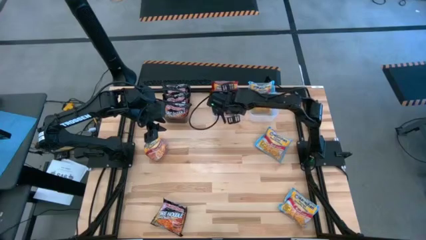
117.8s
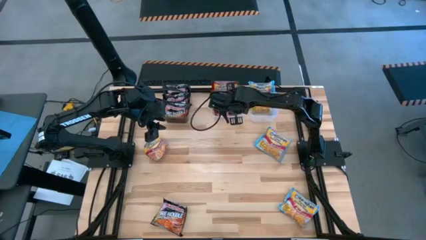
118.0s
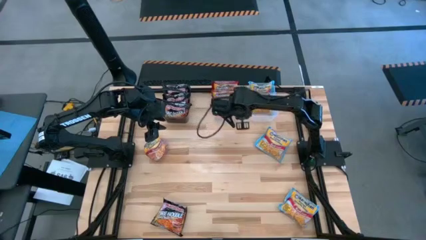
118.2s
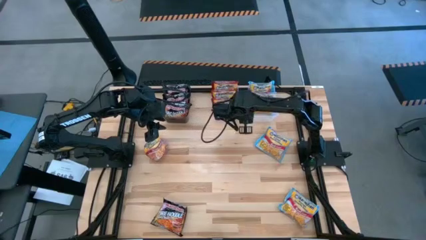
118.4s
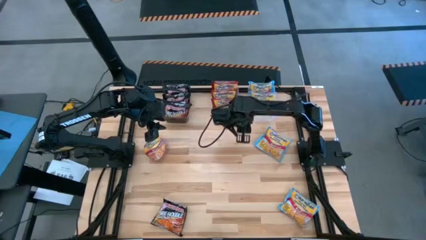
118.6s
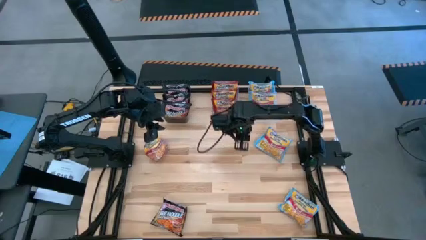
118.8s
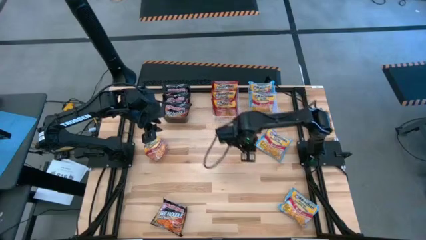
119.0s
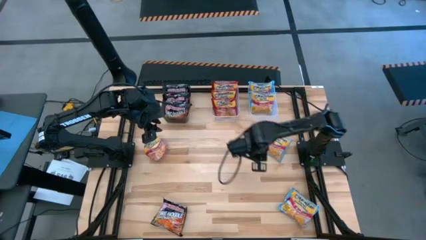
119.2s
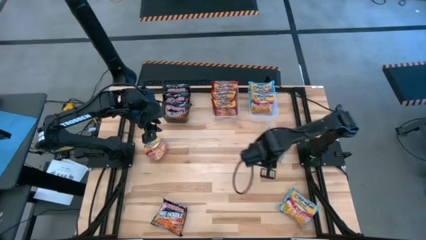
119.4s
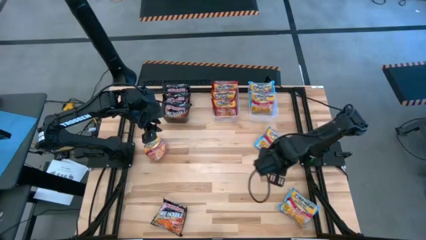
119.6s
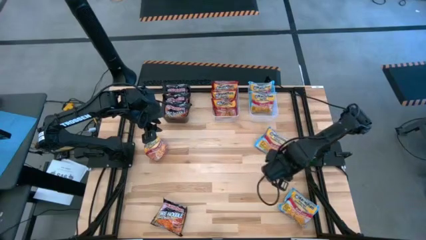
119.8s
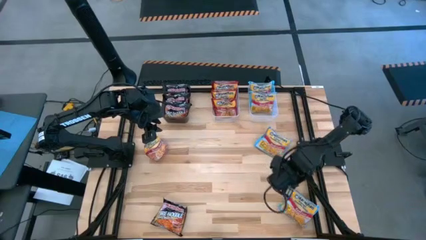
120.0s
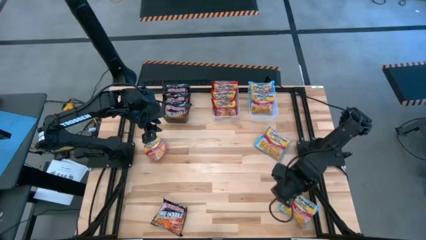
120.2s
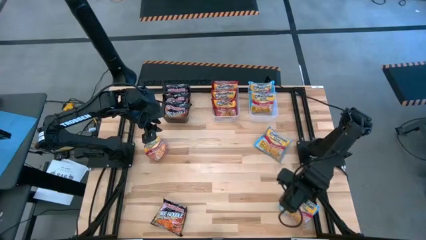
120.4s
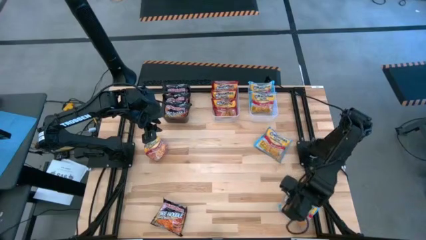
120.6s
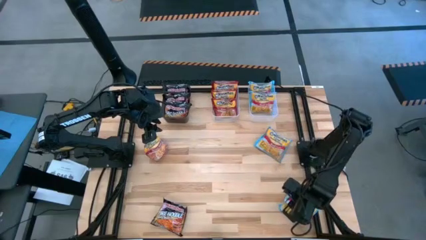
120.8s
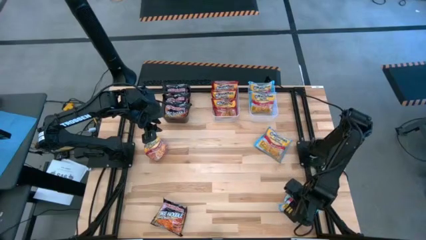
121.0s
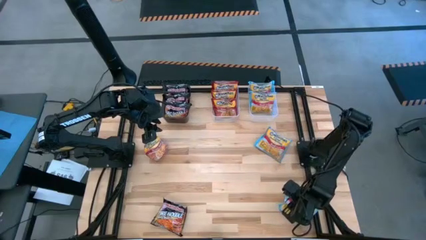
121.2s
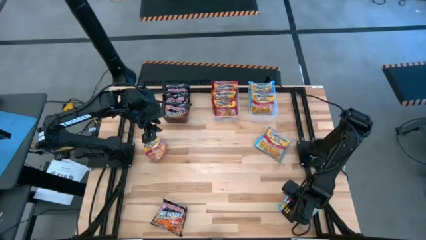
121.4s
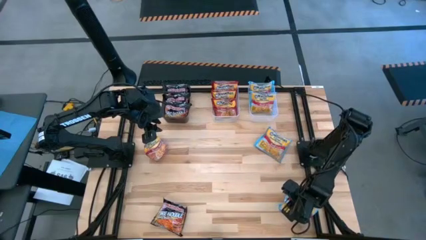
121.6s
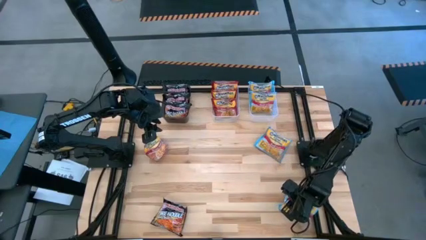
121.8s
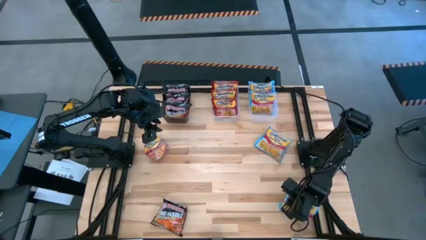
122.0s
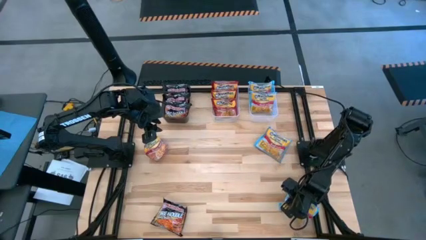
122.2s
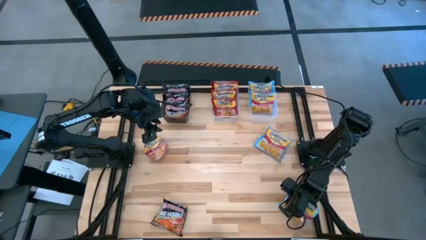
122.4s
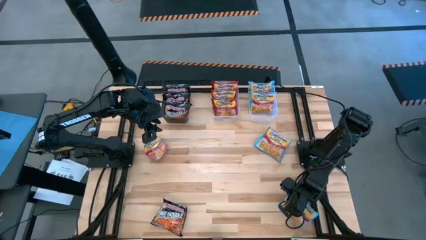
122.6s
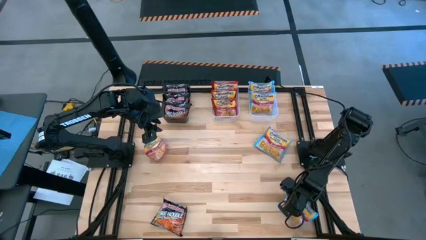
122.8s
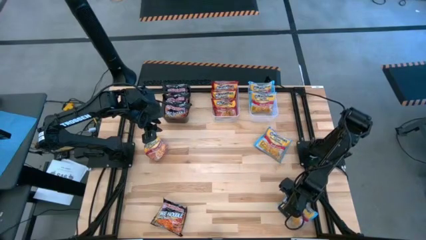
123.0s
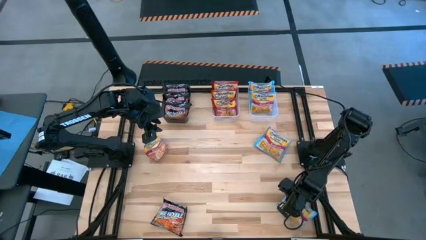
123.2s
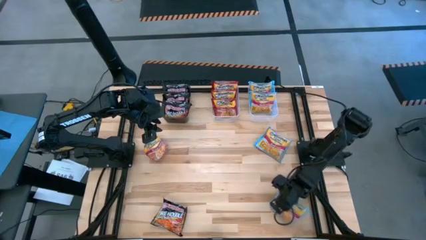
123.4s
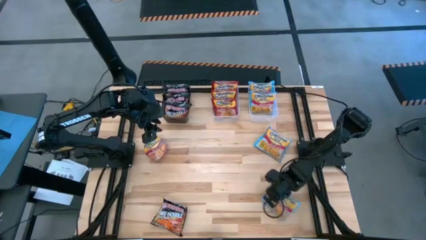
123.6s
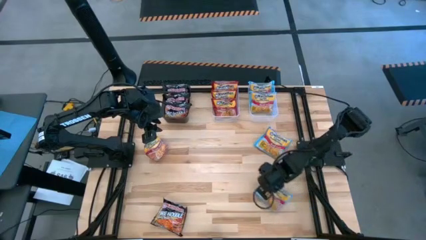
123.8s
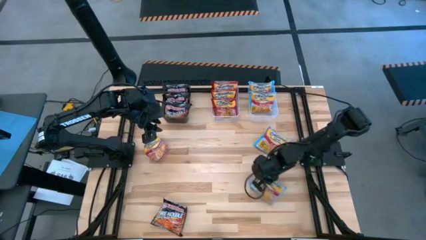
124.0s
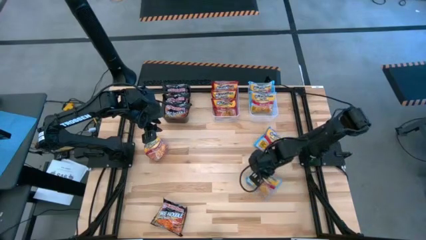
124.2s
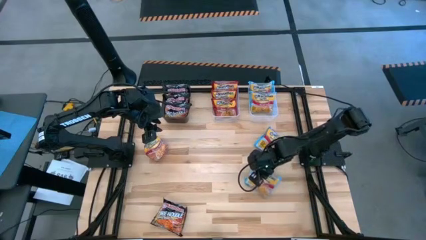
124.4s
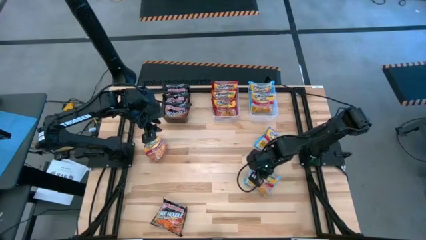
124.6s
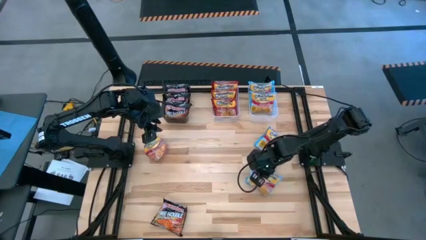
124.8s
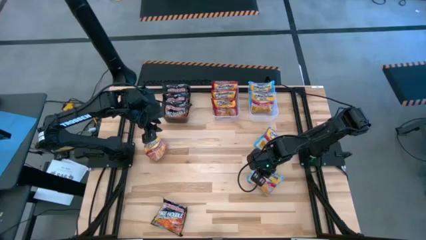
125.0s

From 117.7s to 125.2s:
Task: Sort Maruchan noodles
Put the light blue noodle pack into the black bin

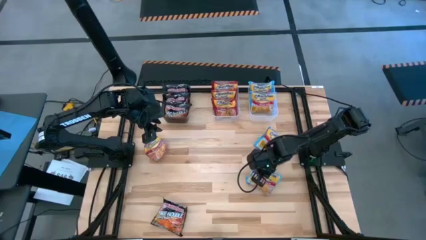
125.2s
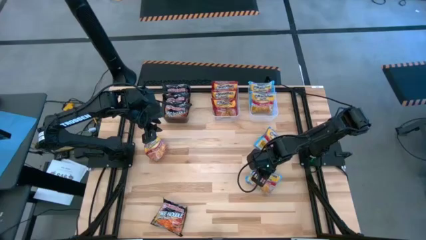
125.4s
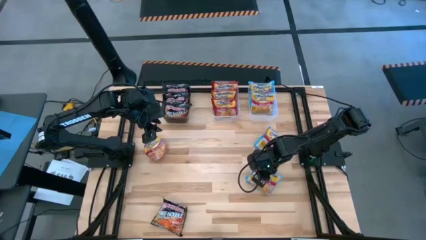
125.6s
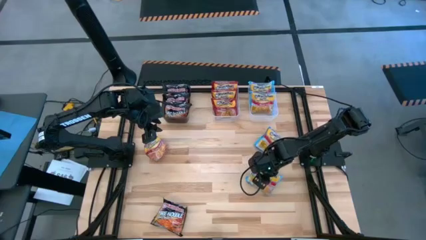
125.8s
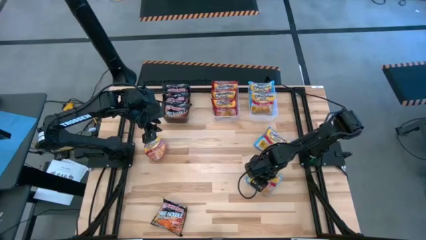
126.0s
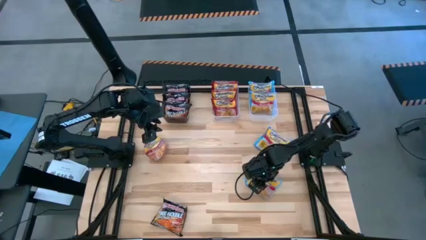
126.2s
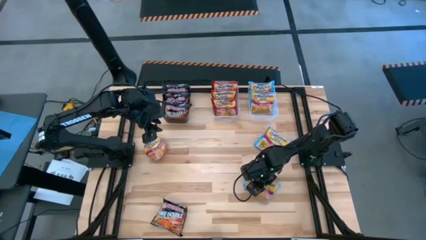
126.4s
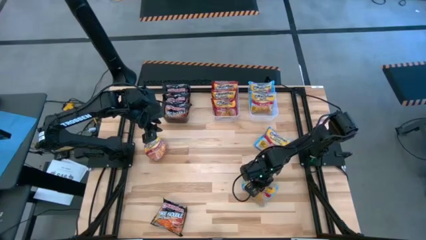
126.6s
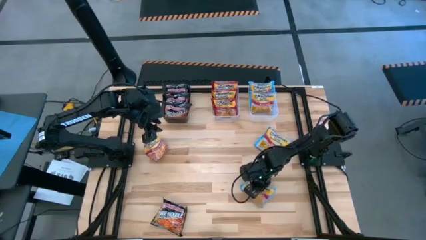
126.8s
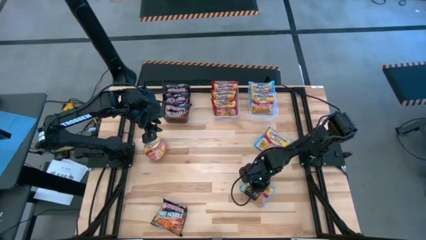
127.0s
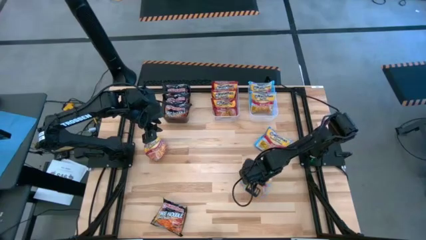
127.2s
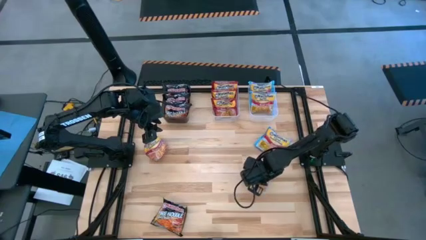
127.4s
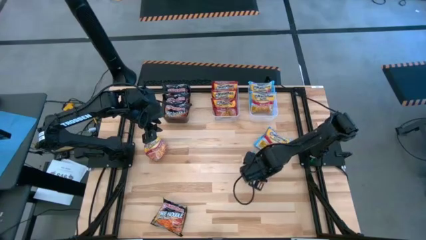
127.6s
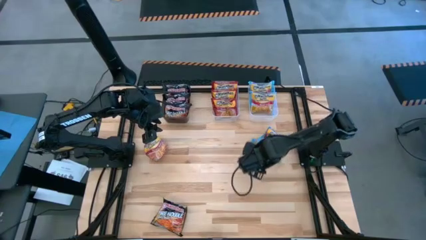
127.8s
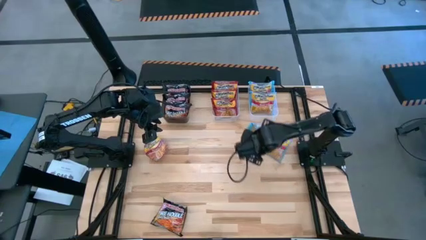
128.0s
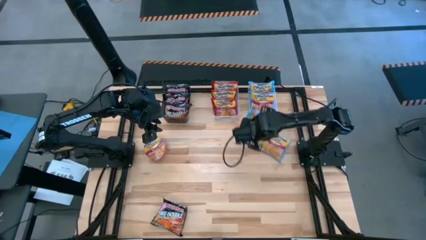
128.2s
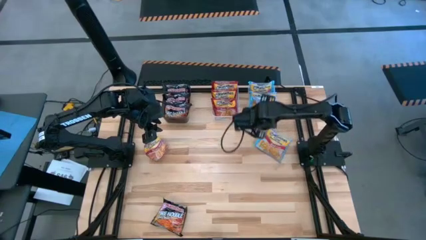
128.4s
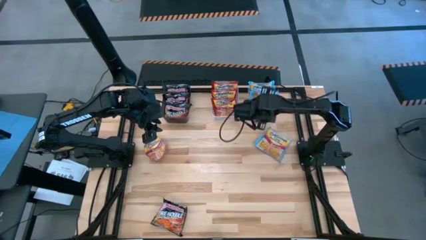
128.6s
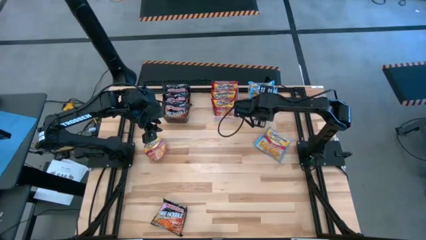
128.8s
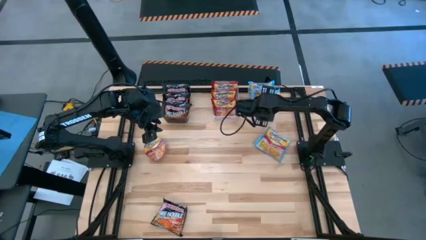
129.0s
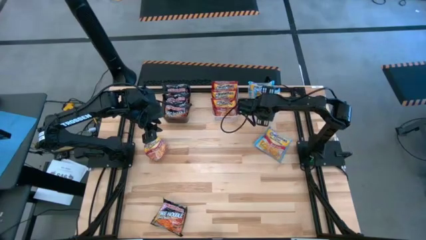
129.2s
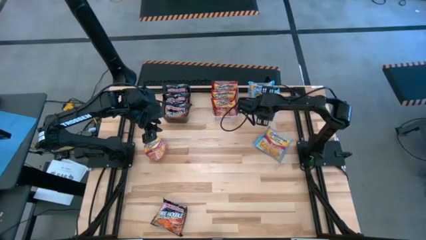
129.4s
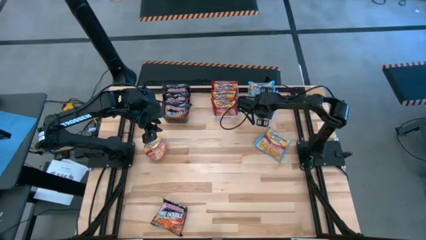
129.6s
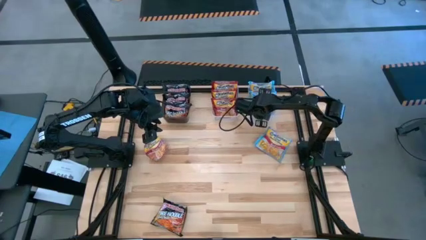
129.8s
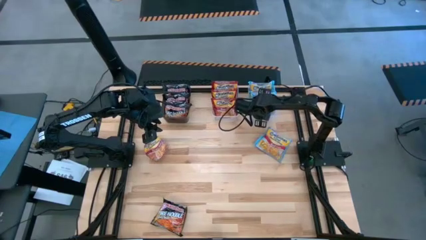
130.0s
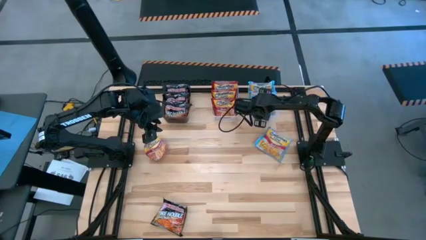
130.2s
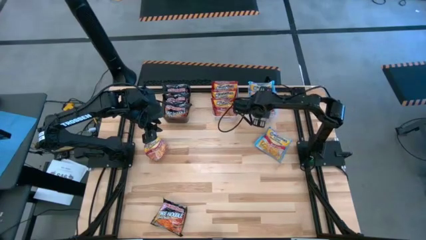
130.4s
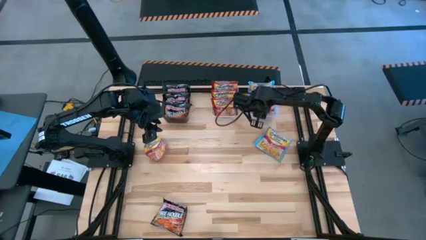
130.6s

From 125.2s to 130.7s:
Put the light blue noodle pack into the black bin
